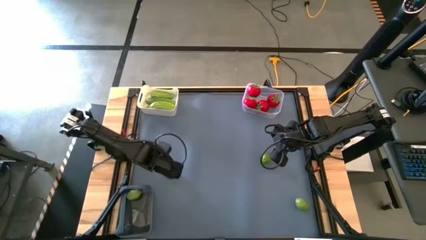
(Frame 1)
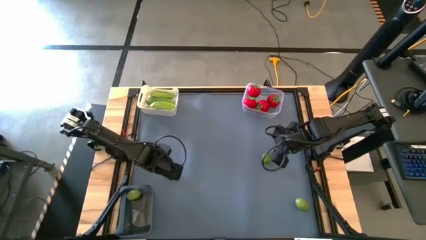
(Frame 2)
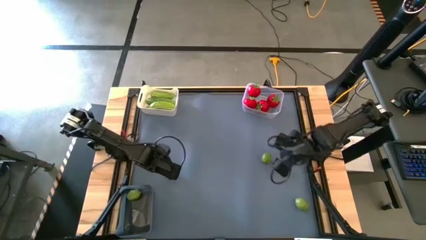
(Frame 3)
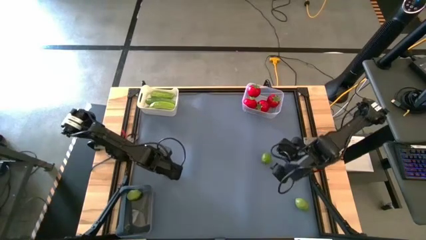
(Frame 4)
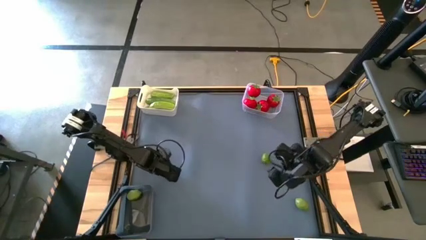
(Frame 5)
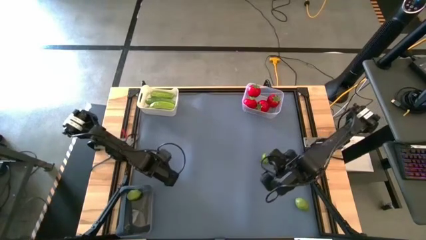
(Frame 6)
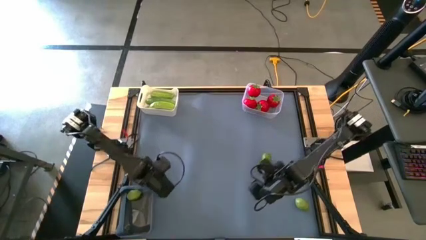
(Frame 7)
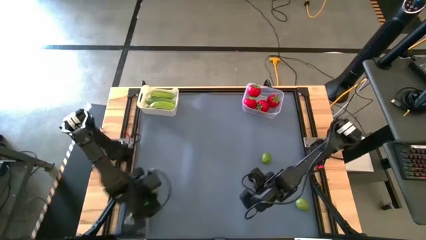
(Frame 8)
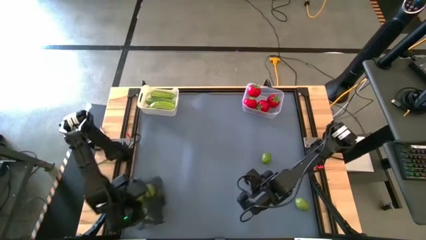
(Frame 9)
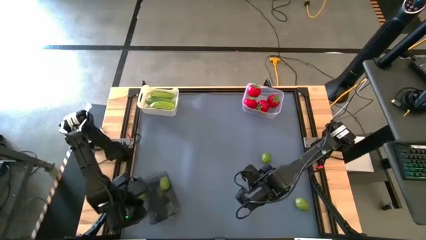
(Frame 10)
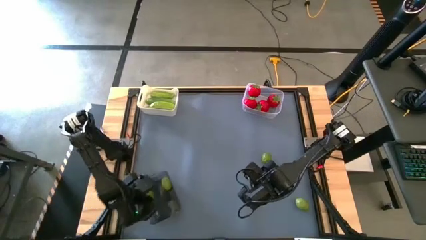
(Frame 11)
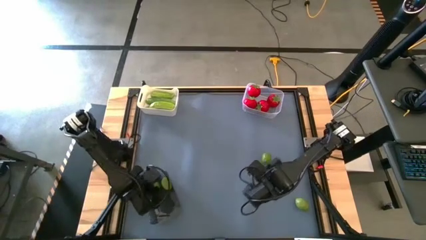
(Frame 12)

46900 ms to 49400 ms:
Task: Sort produce into baskets
Put the left lime into the black bin

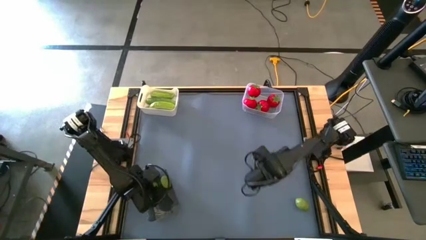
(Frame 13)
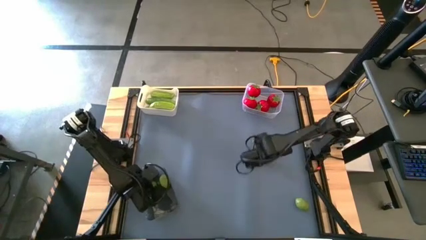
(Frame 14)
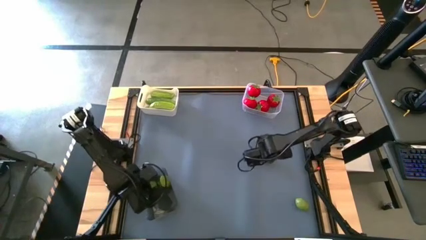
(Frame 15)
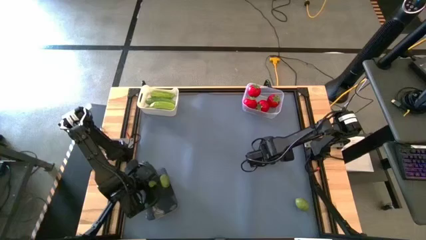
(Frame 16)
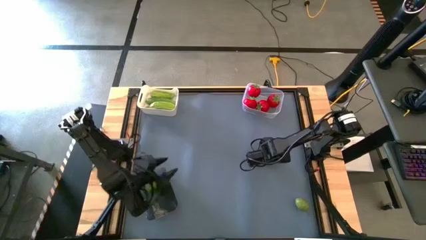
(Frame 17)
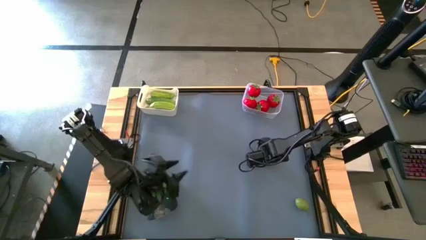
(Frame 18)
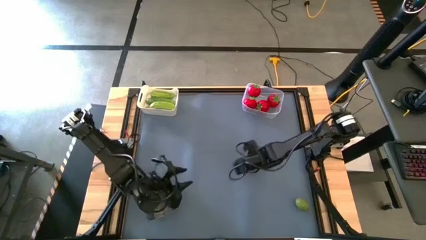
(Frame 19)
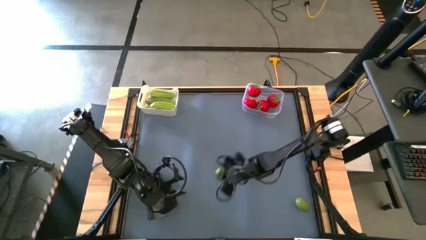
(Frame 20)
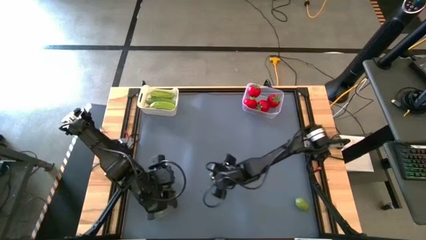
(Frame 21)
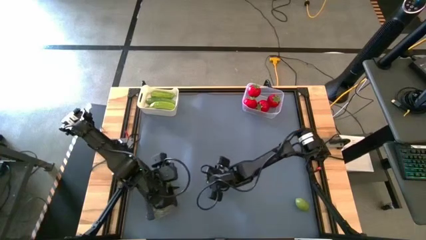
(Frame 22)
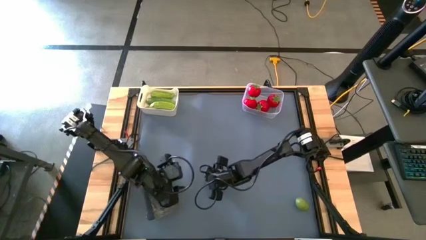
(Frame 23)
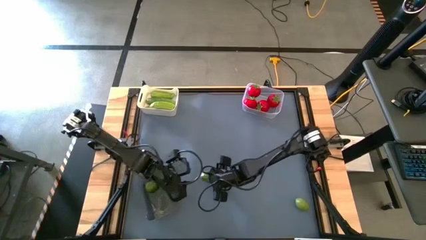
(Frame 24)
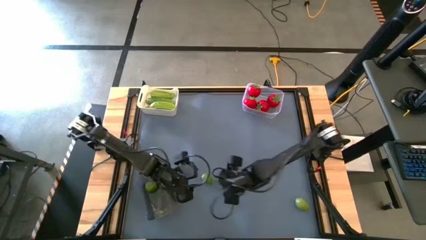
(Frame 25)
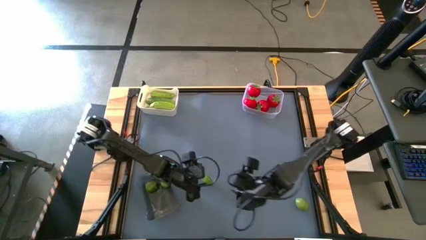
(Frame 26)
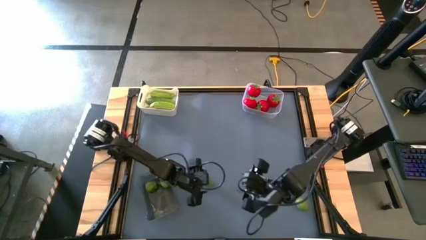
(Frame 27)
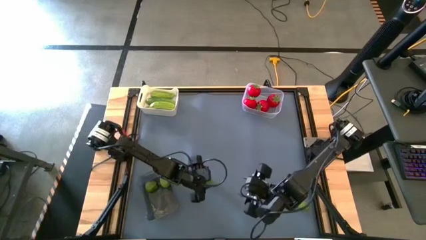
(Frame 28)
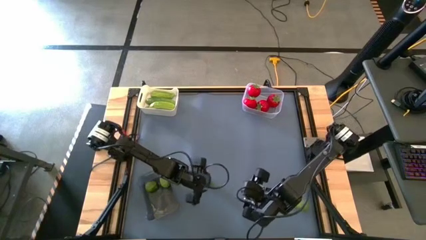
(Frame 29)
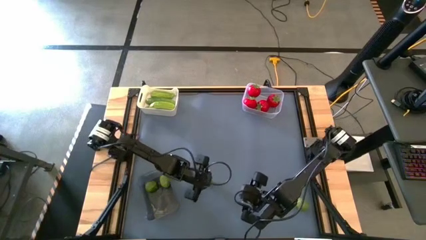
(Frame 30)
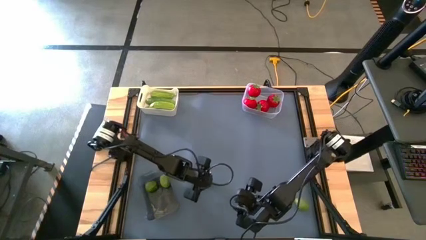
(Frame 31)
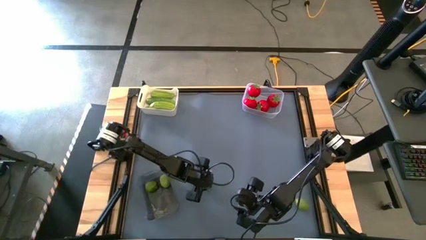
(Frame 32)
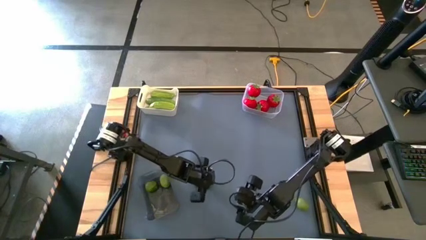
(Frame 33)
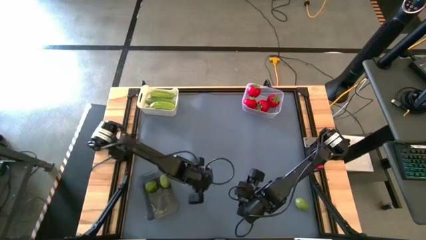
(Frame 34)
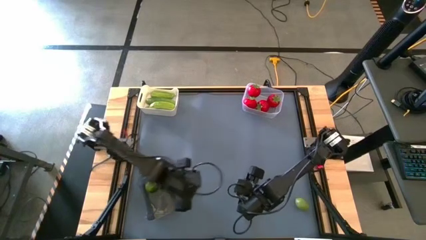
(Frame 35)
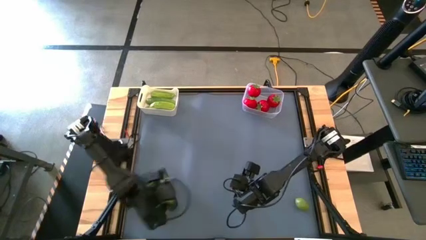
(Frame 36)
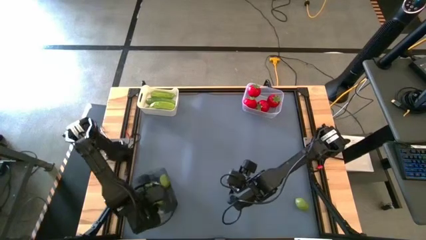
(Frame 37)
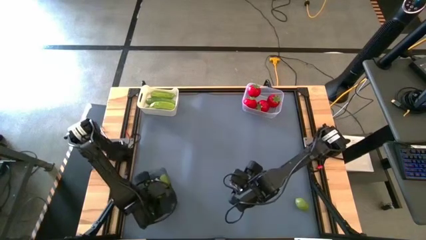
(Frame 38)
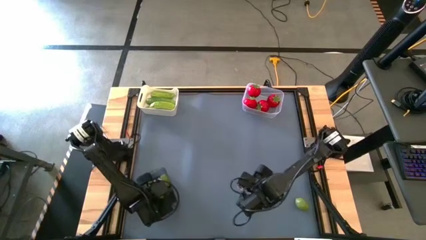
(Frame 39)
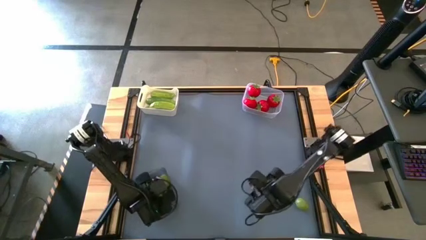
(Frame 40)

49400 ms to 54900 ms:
Put the top lime into the black bin

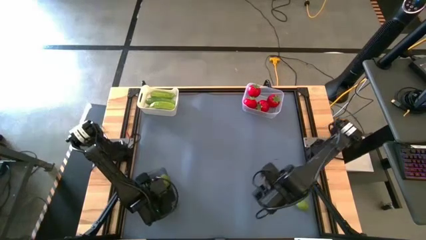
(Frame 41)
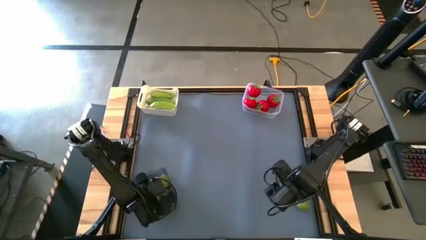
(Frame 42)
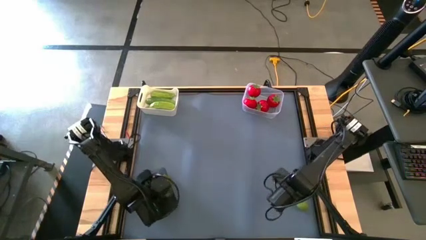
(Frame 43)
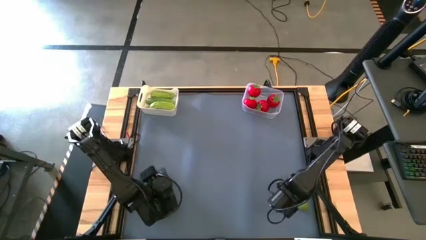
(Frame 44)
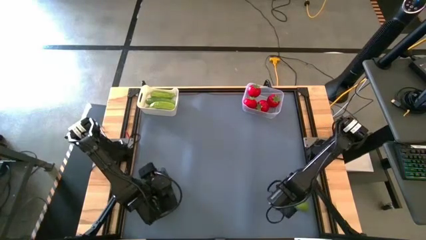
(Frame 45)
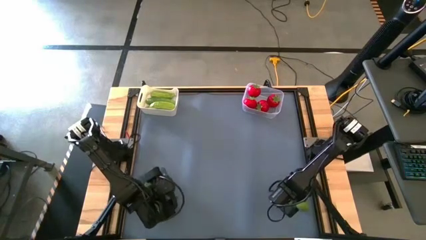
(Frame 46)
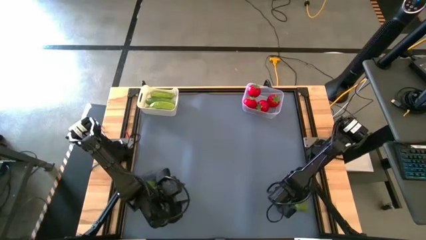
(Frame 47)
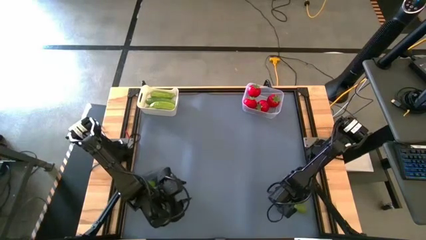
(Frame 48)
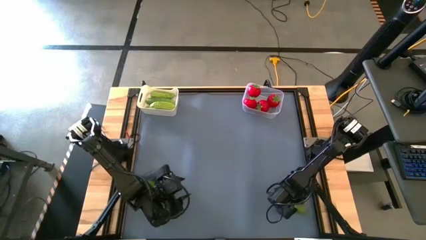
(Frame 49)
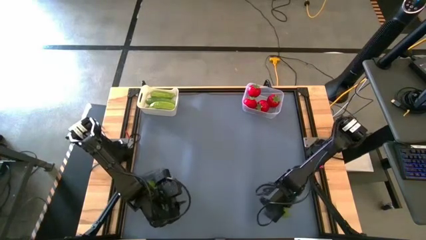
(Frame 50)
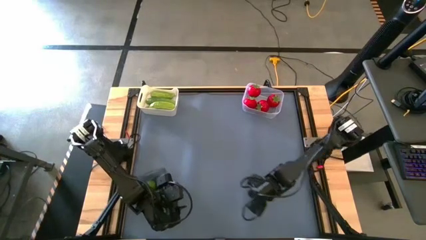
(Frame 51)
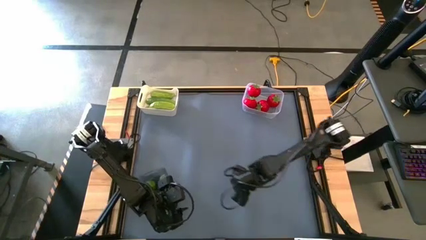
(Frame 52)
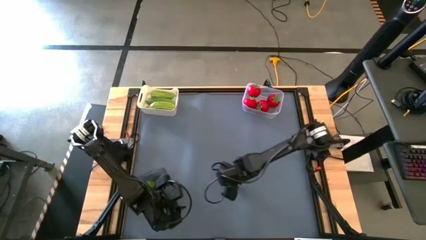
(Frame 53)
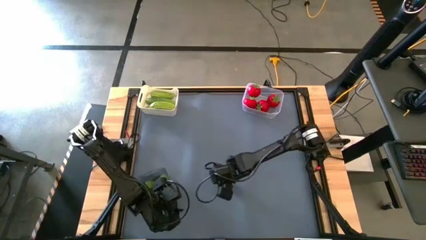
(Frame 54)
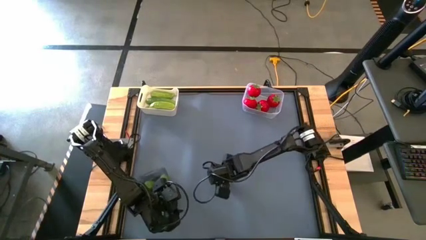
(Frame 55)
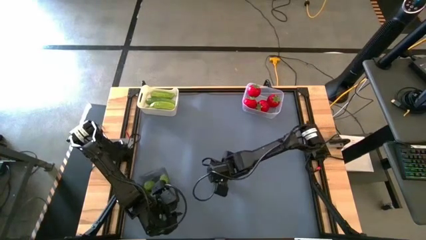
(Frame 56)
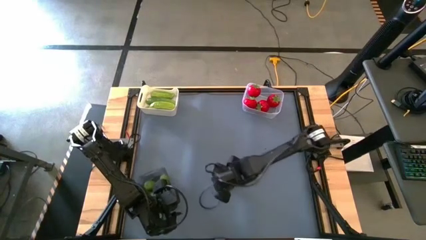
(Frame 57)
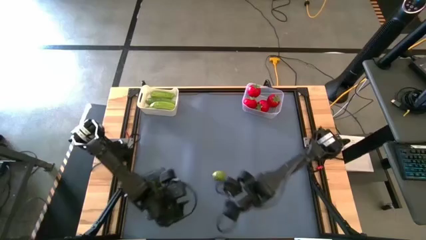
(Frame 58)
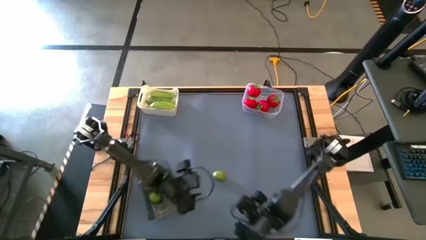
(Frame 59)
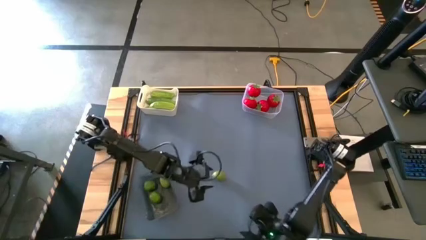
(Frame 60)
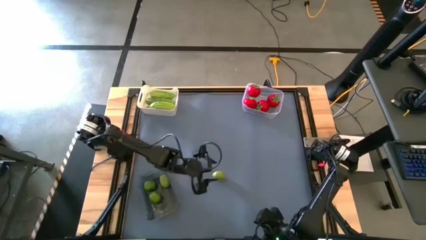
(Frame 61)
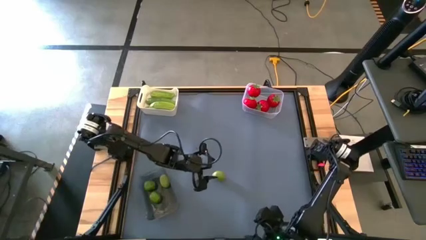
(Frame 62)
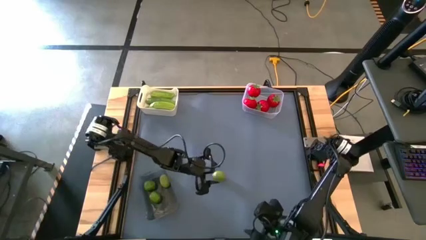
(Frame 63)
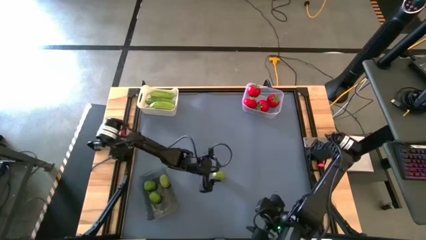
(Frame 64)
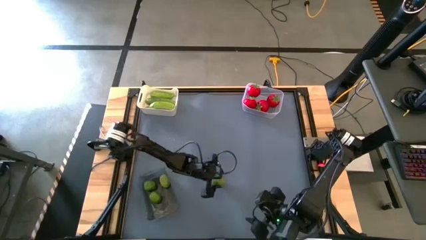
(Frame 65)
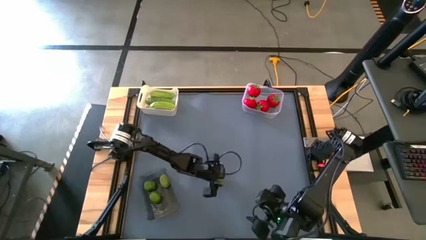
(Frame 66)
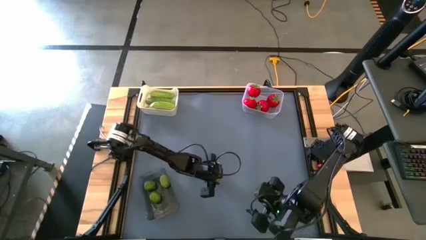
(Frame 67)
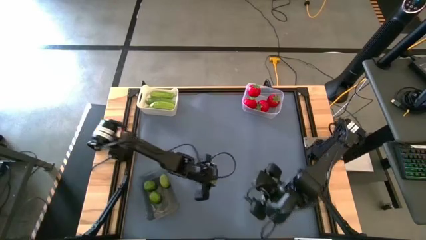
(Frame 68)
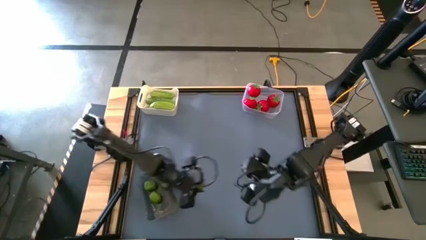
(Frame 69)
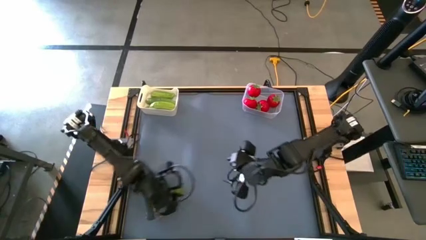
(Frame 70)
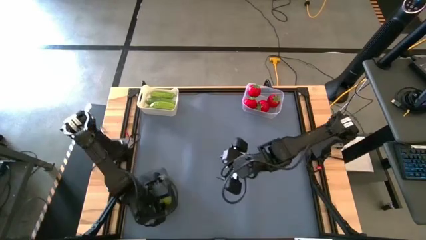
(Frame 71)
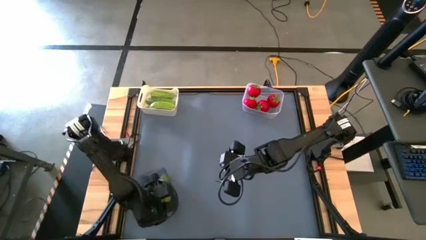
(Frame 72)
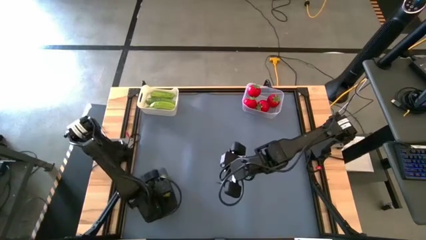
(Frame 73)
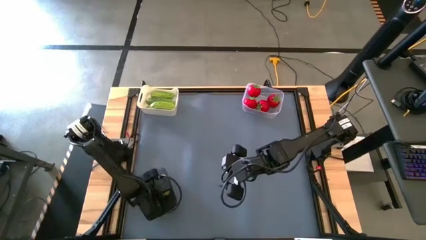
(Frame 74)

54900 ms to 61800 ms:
Put the lime into the black bin

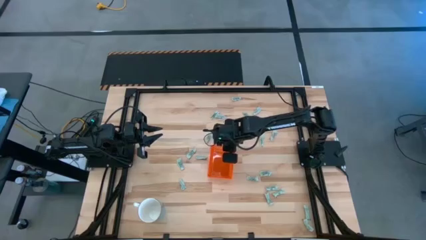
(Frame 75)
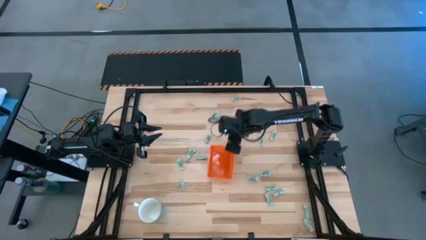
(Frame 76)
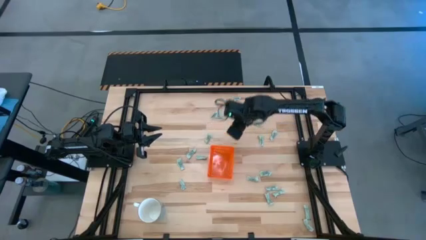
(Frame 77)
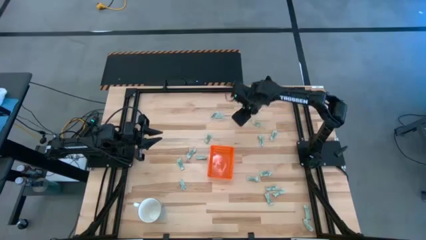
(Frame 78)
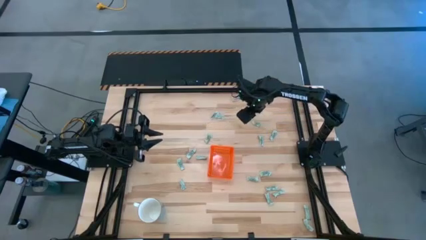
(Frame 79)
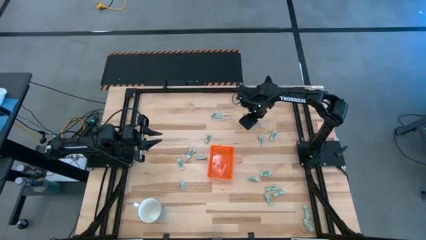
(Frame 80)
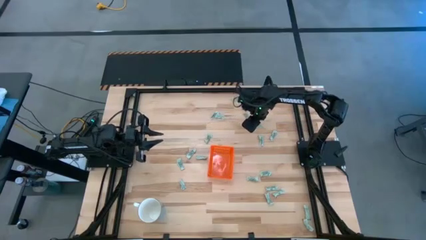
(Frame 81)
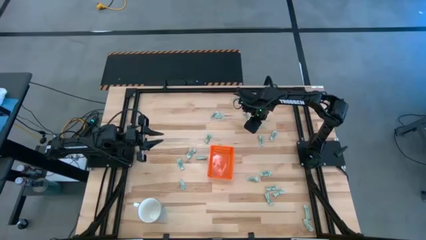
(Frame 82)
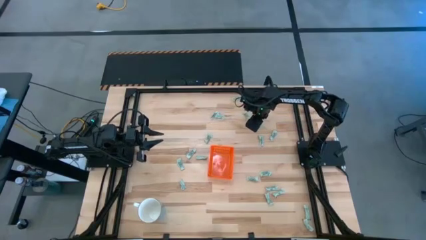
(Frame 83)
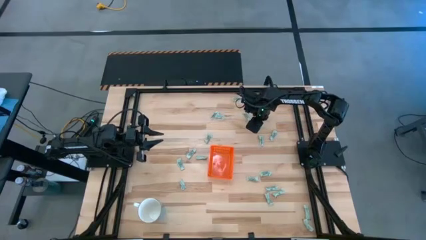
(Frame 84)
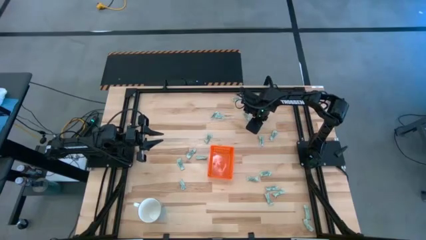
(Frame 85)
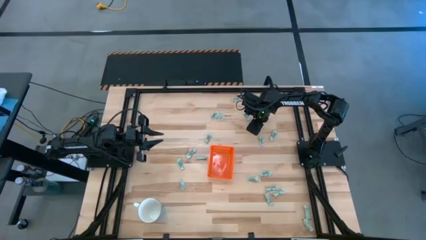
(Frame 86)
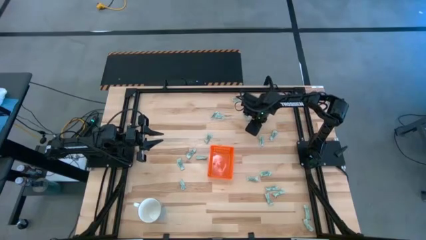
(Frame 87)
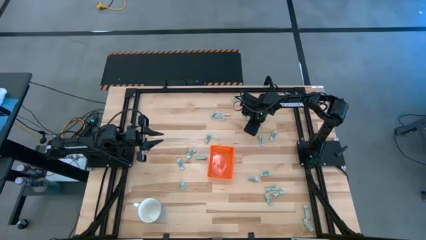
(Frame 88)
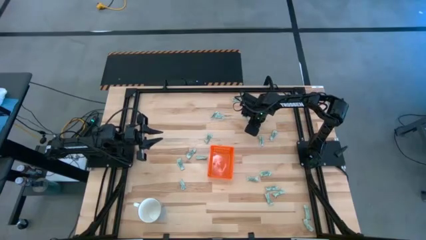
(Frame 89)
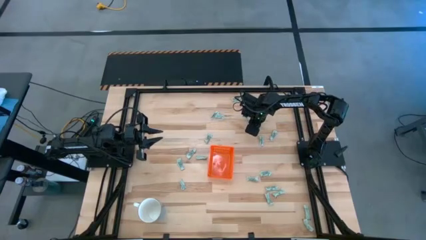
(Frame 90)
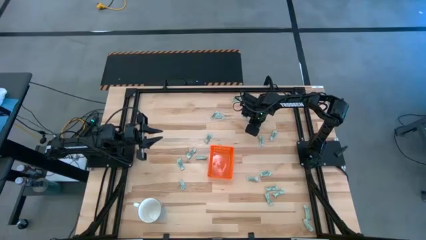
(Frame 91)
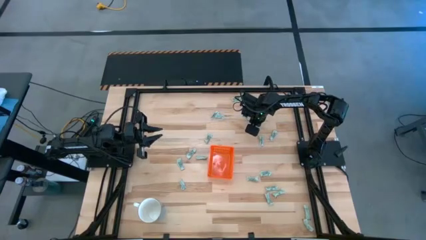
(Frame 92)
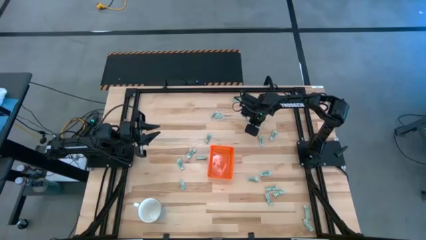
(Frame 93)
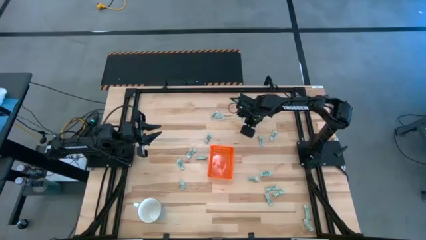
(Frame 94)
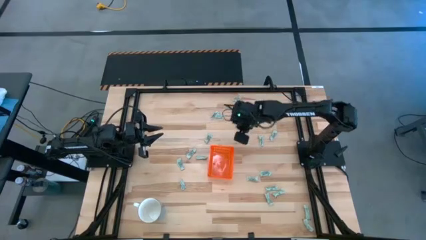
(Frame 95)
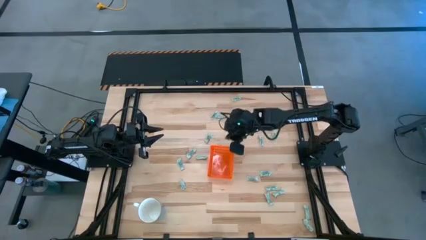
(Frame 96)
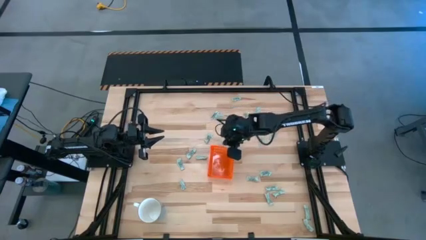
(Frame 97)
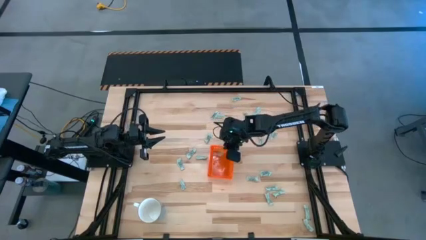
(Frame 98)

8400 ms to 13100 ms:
Task: Pick and place Stevia / Truvia into bins
Put the stevia packet into the orange bin
